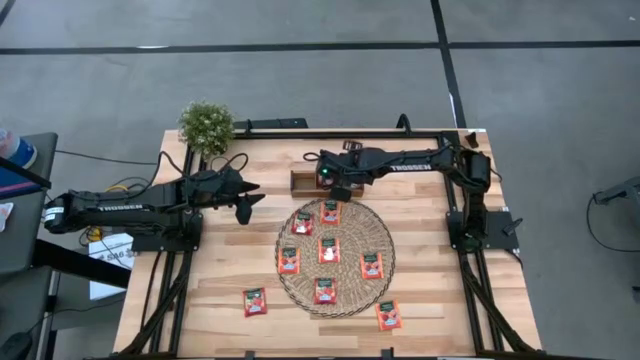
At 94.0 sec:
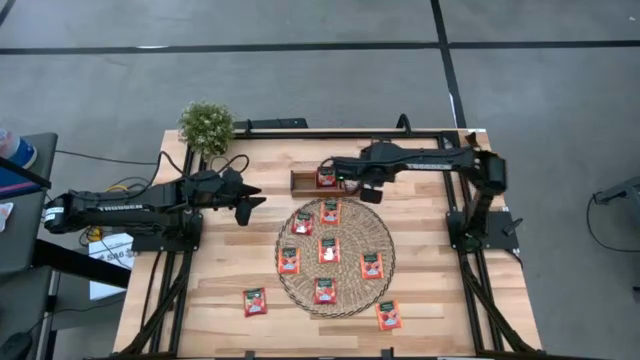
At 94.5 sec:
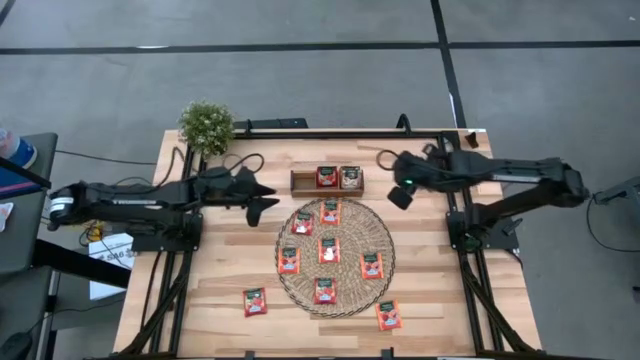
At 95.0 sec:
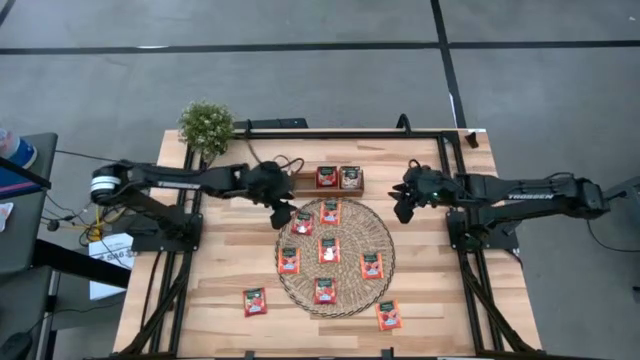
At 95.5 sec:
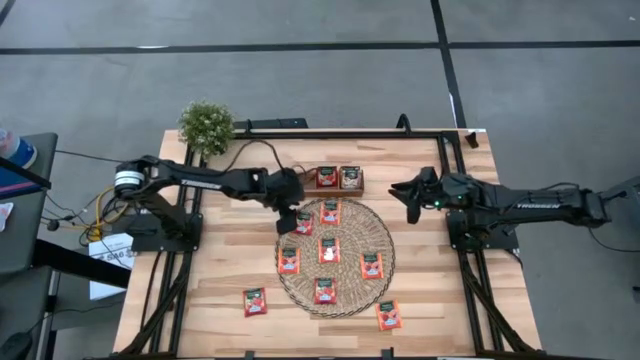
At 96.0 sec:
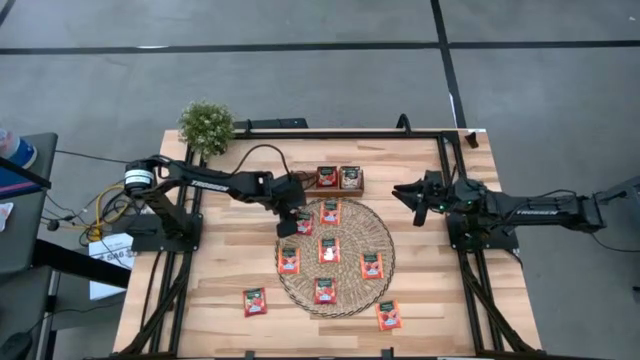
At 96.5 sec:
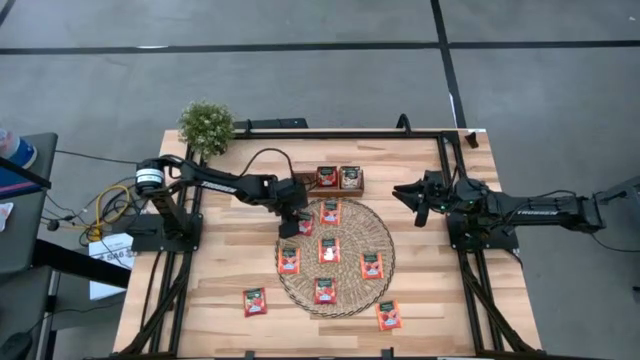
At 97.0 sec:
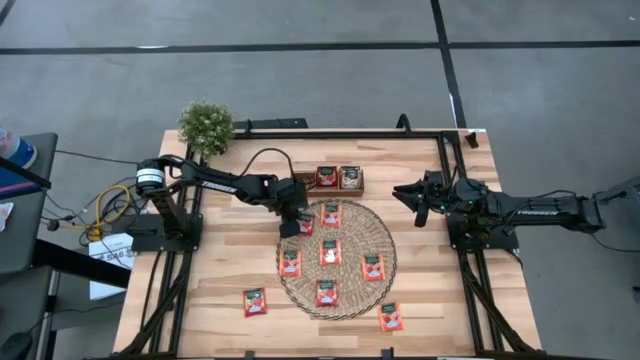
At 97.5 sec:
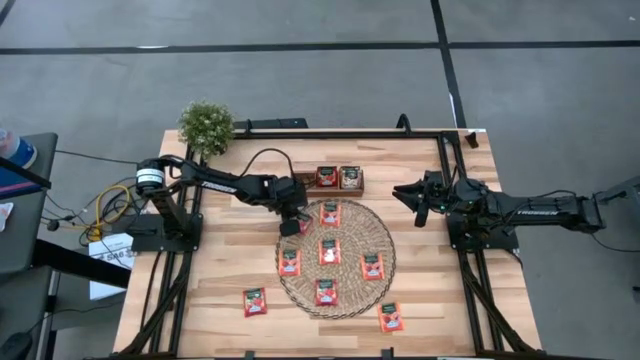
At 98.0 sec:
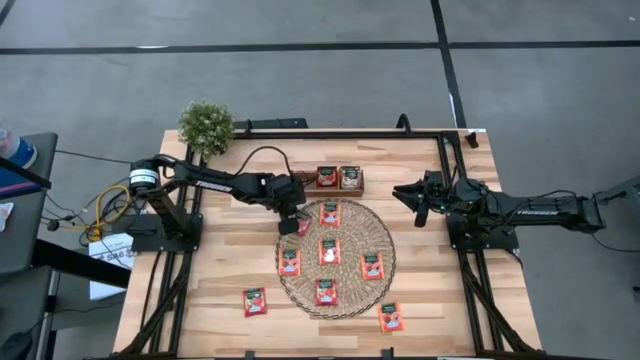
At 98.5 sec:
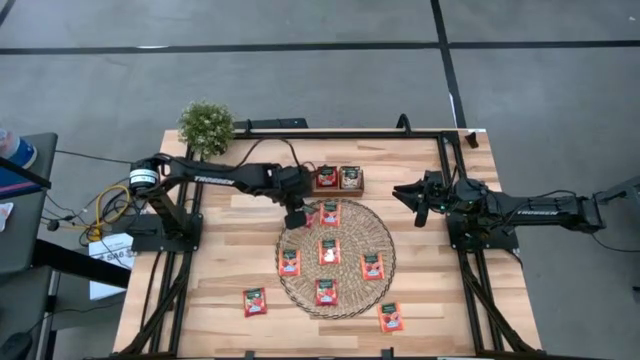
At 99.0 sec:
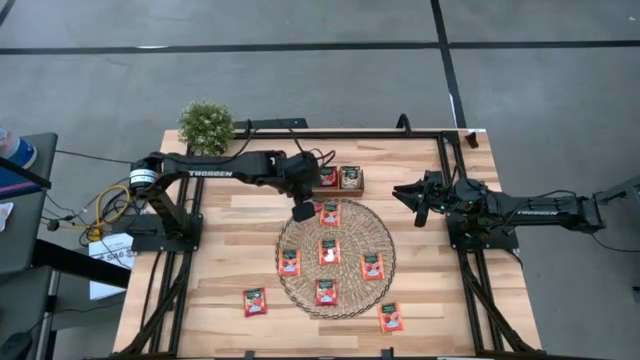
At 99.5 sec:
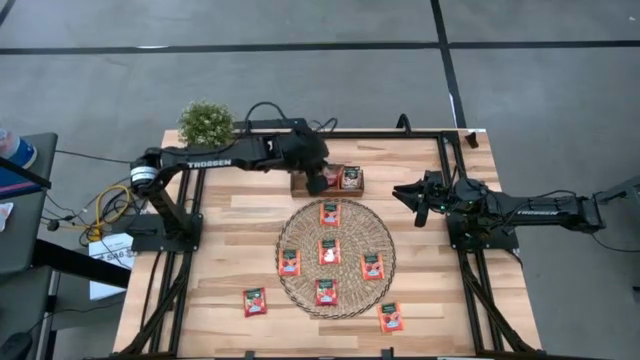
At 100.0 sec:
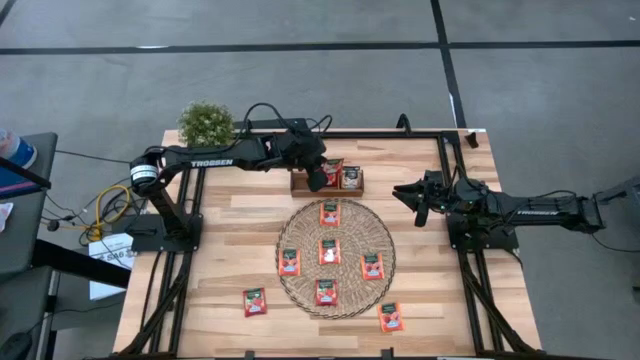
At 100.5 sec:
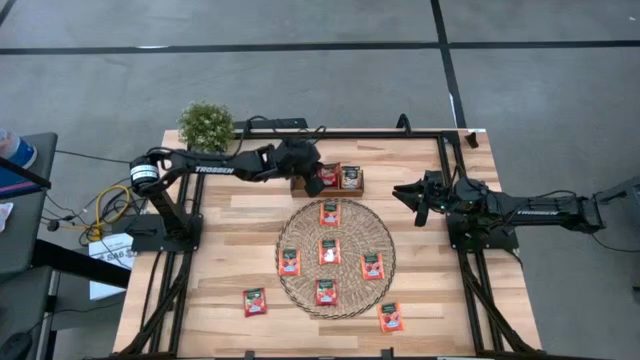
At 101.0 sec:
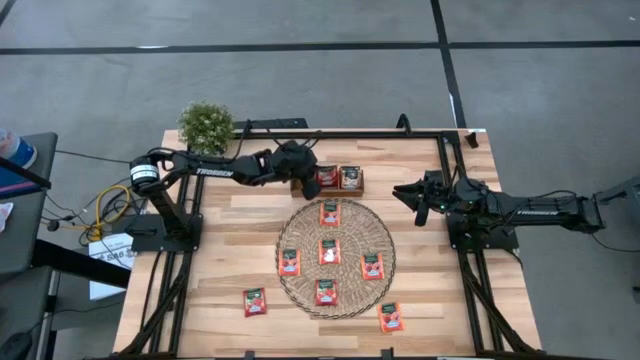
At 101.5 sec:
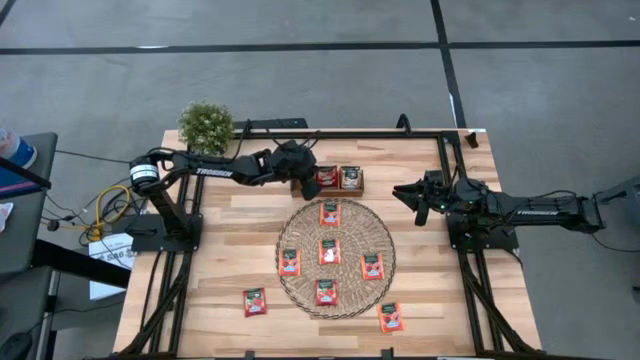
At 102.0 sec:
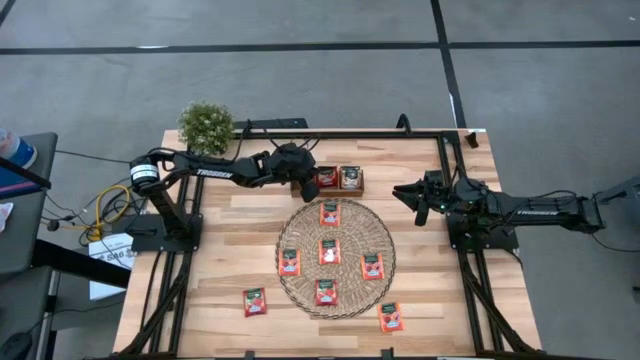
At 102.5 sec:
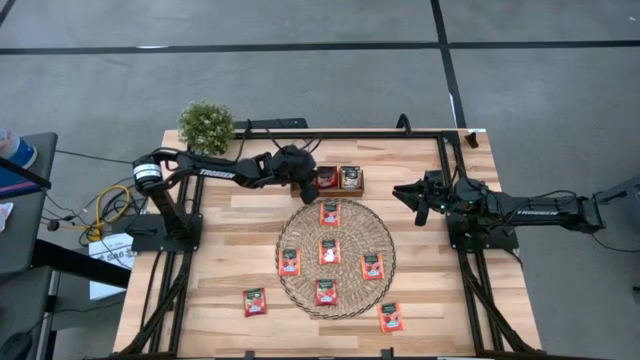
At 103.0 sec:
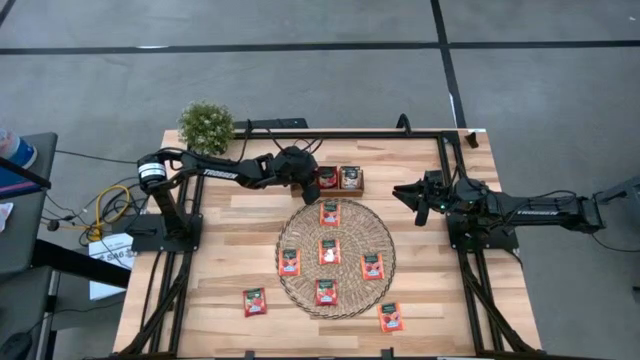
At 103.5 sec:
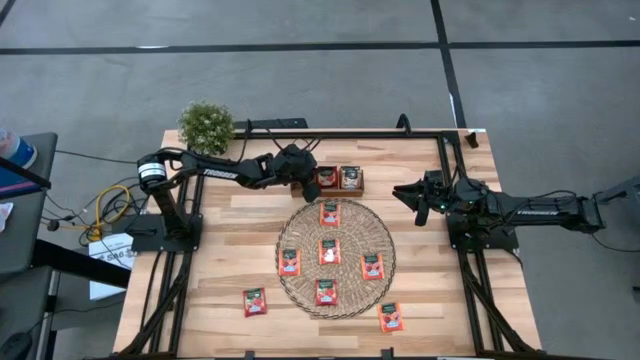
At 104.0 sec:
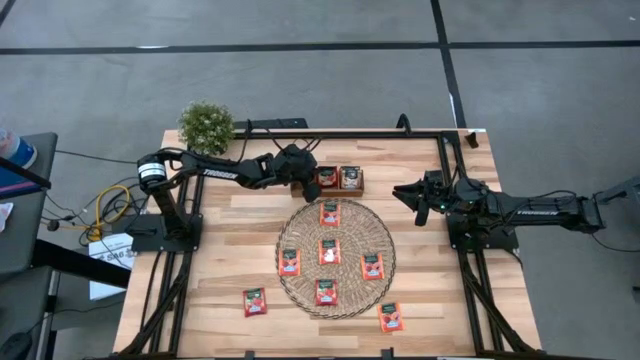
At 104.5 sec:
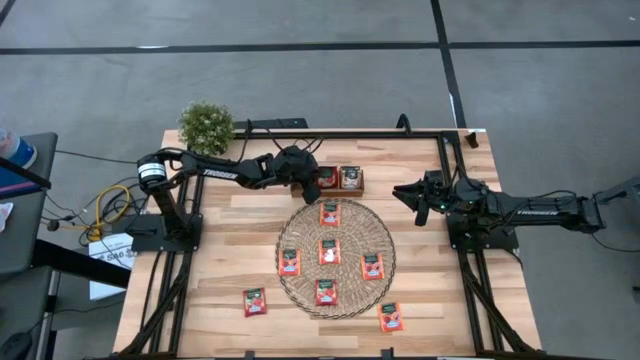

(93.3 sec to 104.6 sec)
Task: Pick & Place Tea
Put the red tea bag into the middle section of the wooden organizer

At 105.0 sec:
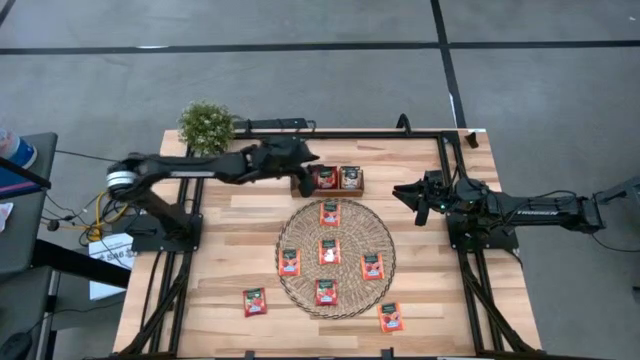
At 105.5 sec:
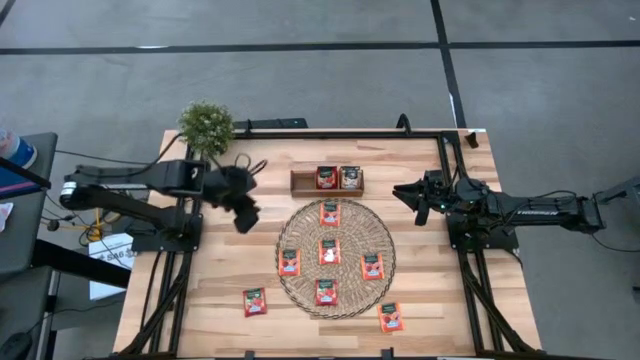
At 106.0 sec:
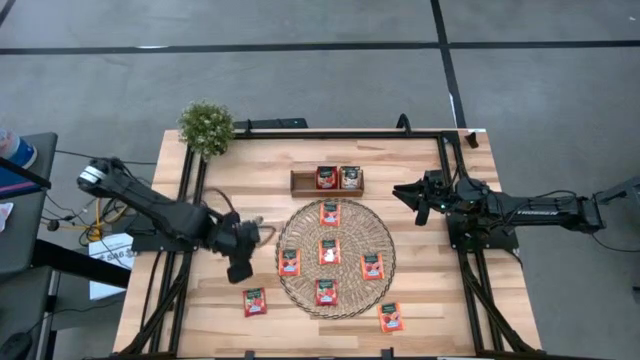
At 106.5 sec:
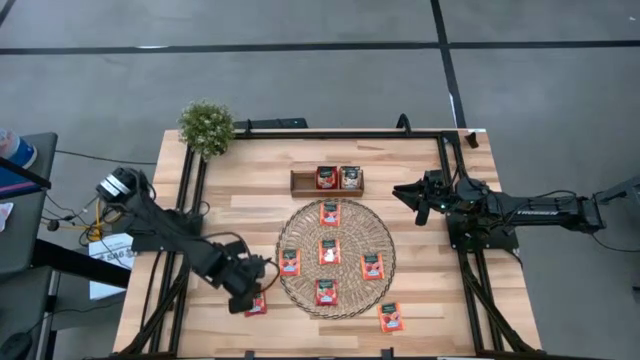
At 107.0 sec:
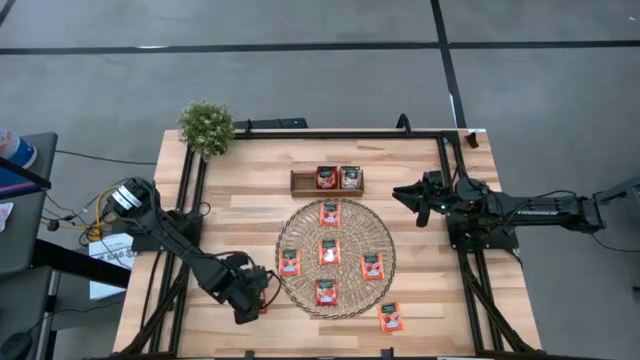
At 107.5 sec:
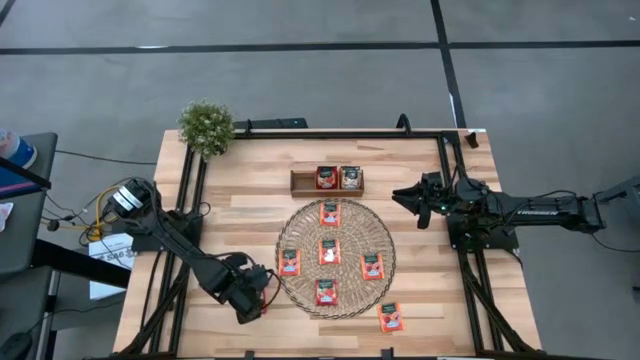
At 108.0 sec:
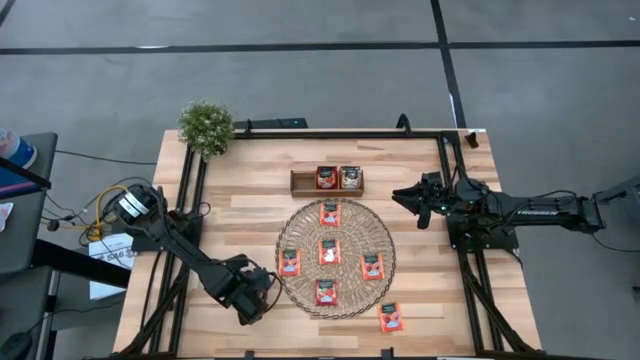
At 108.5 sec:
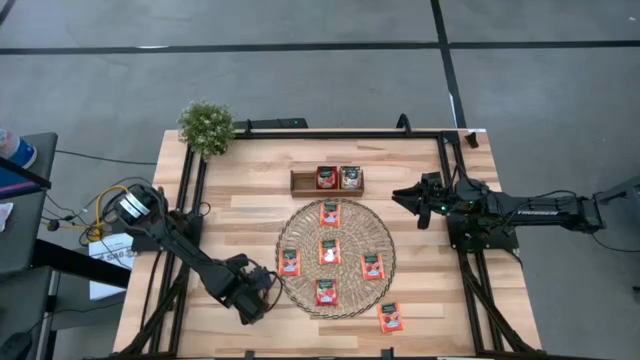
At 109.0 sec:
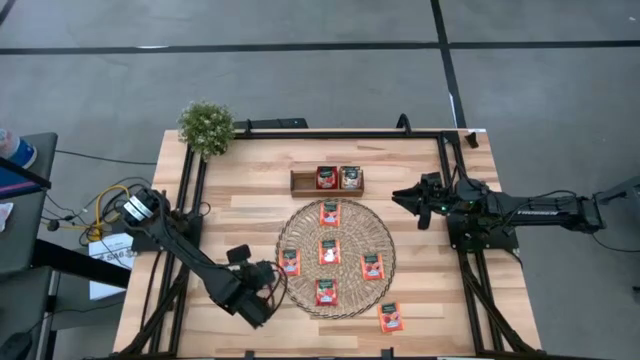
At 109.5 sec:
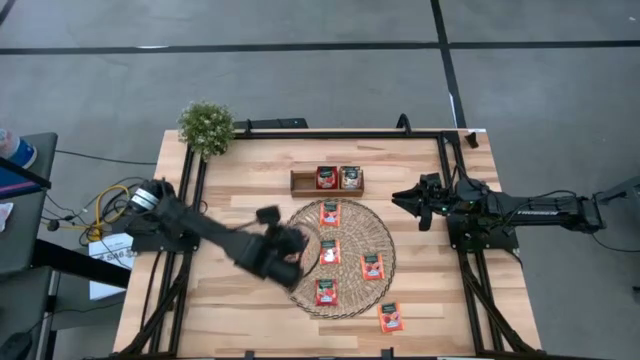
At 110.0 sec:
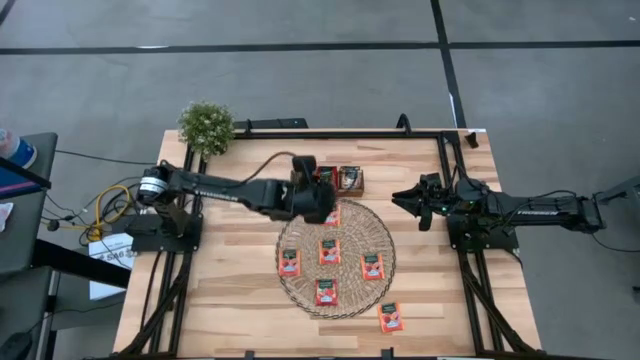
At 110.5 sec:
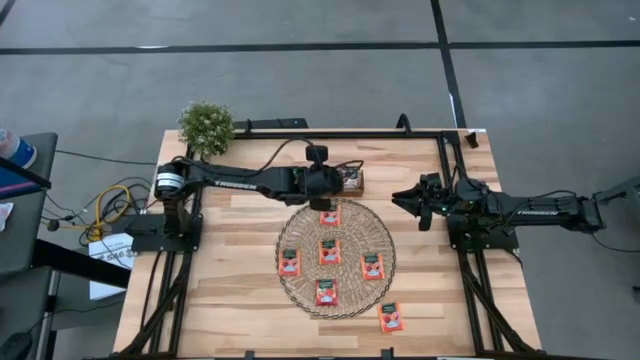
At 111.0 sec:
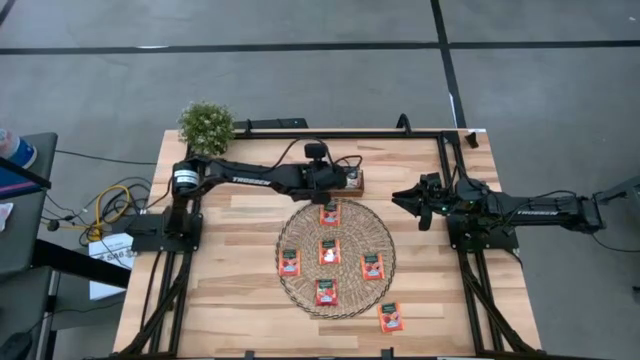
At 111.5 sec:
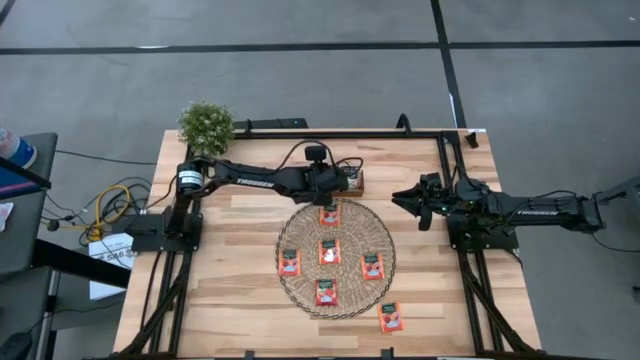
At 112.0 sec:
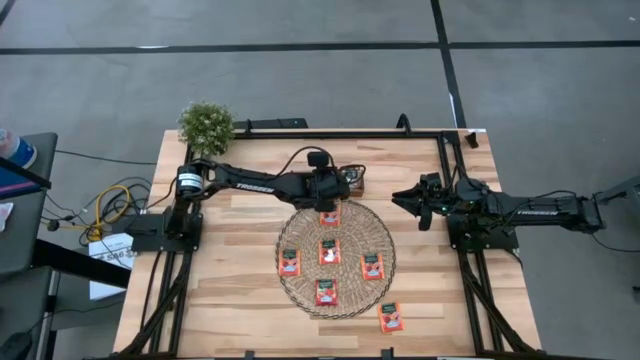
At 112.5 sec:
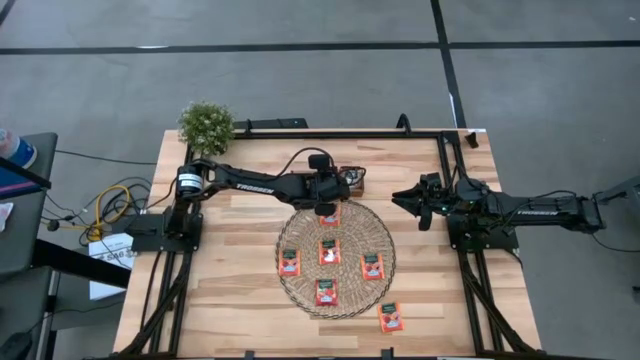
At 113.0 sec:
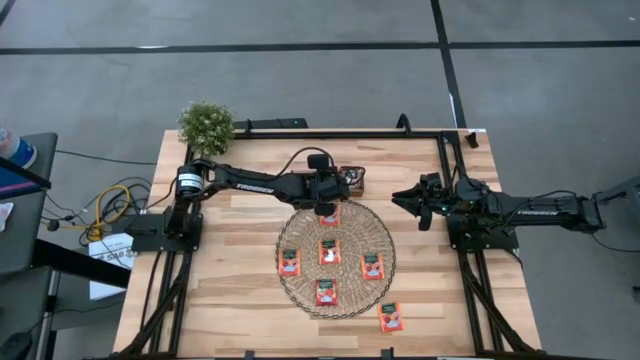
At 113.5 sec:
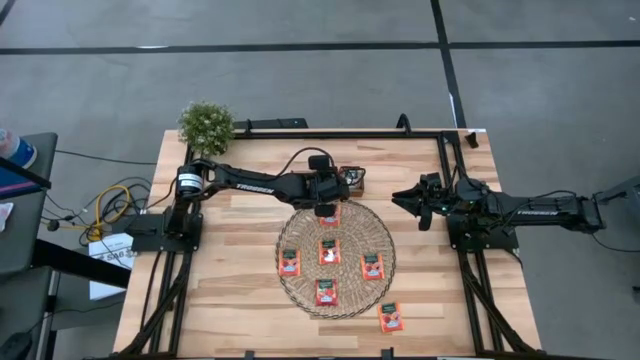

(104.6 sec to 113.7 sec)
Put the red tea bag into the middle section of the wooden organizer
